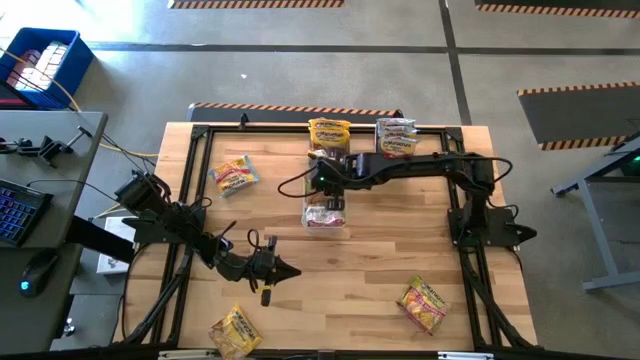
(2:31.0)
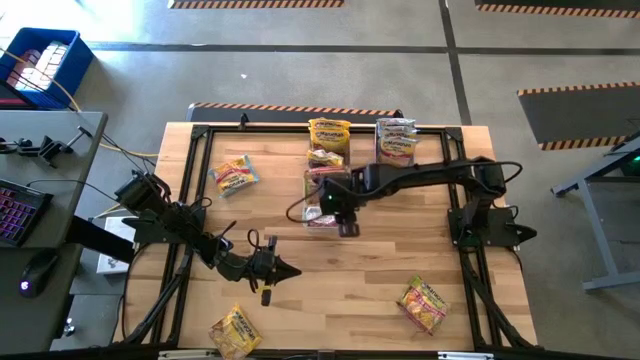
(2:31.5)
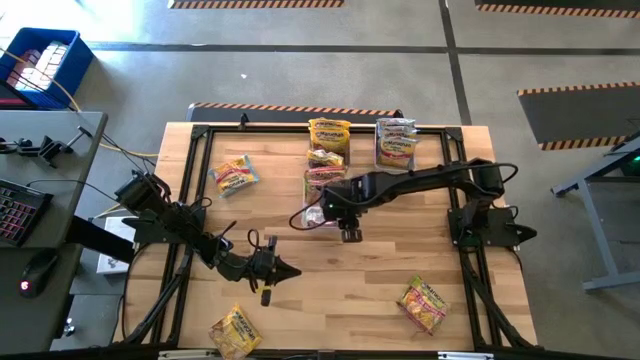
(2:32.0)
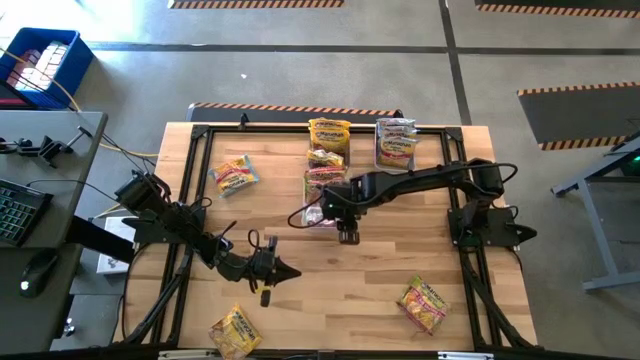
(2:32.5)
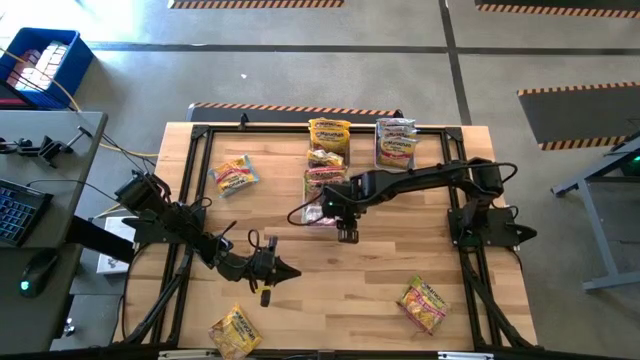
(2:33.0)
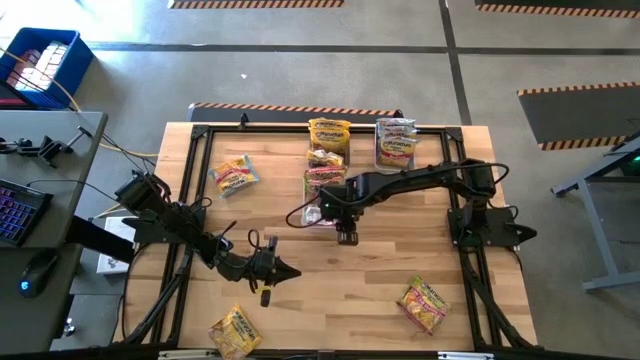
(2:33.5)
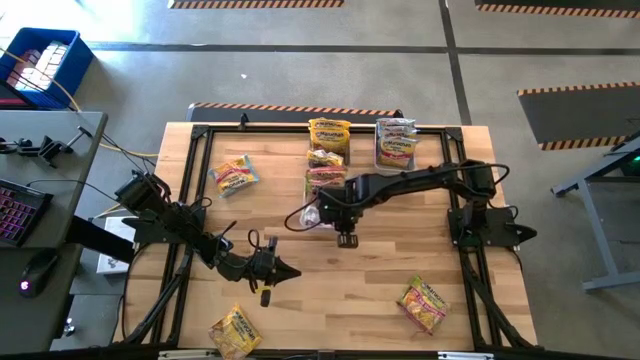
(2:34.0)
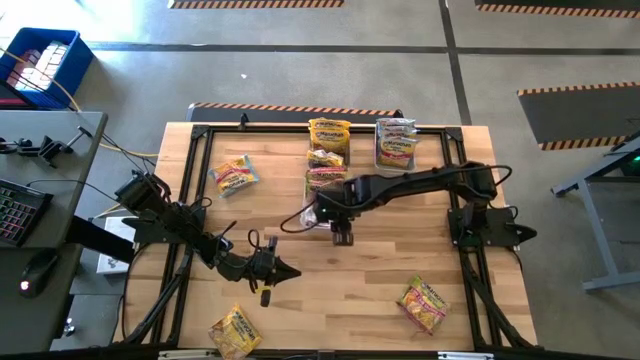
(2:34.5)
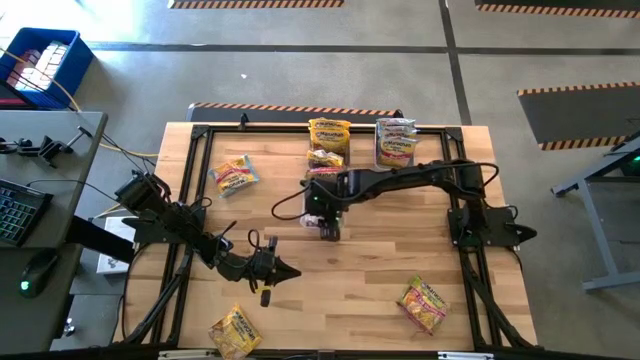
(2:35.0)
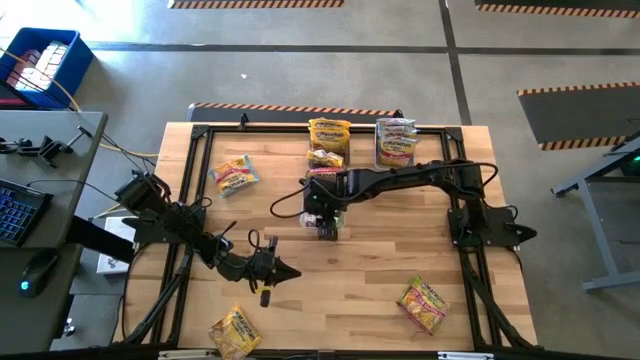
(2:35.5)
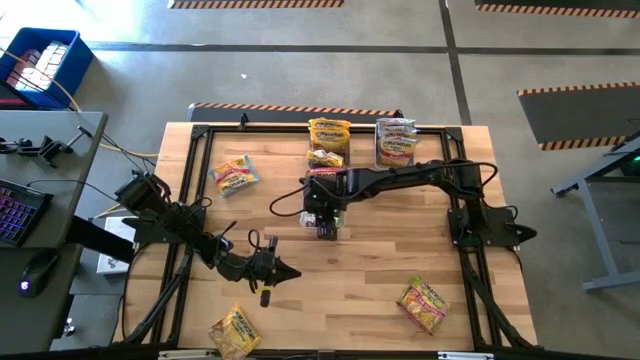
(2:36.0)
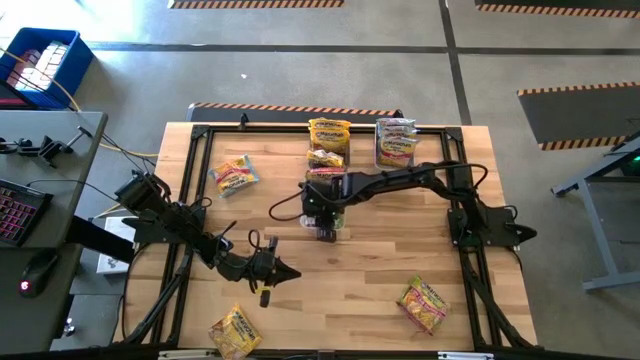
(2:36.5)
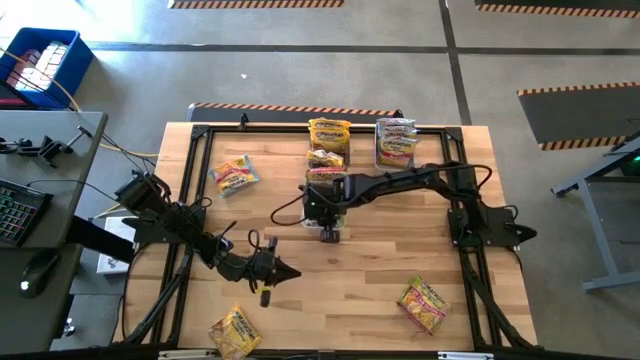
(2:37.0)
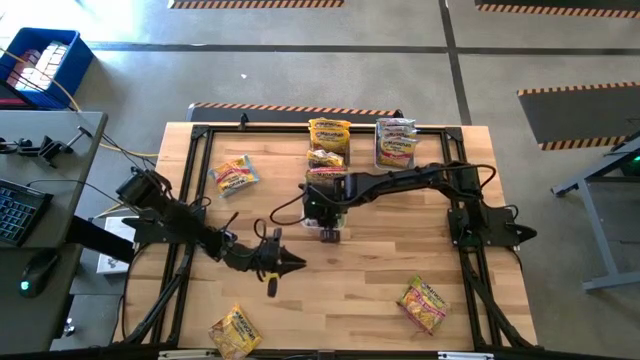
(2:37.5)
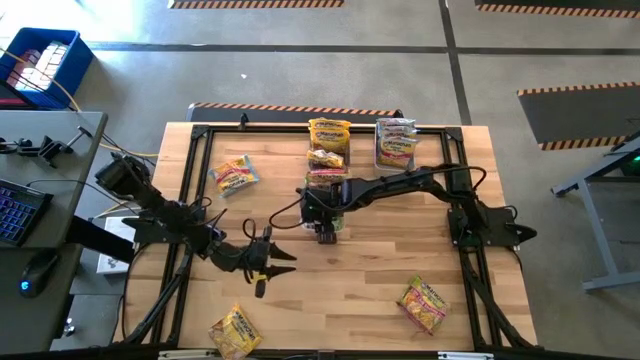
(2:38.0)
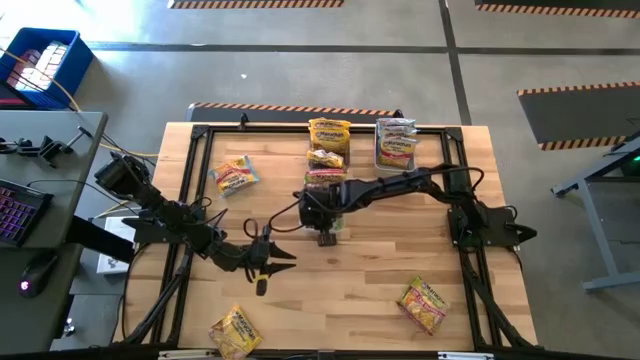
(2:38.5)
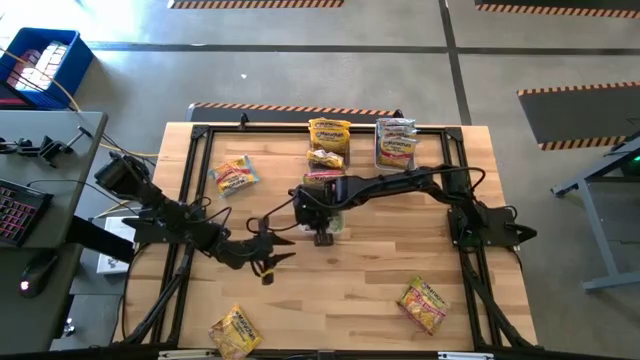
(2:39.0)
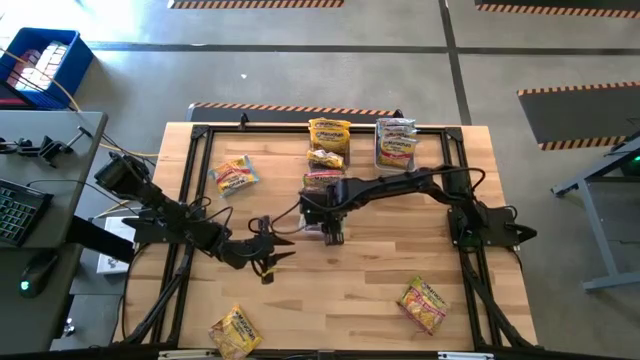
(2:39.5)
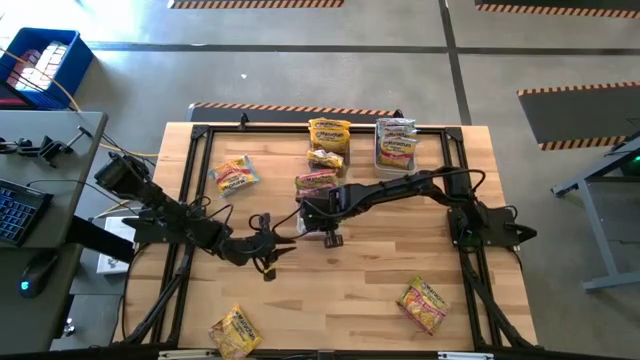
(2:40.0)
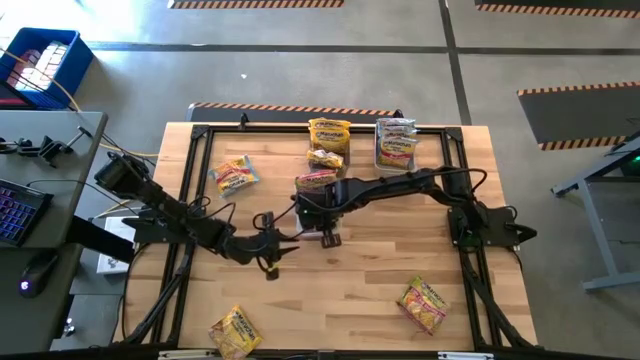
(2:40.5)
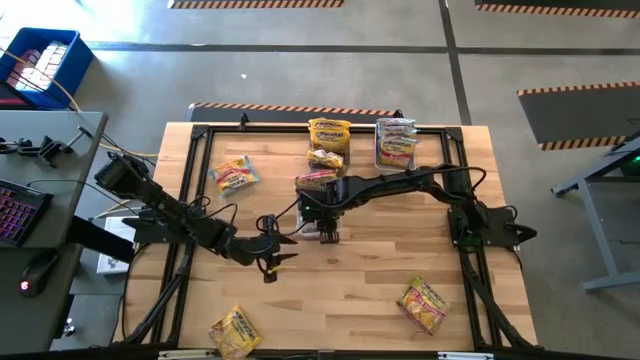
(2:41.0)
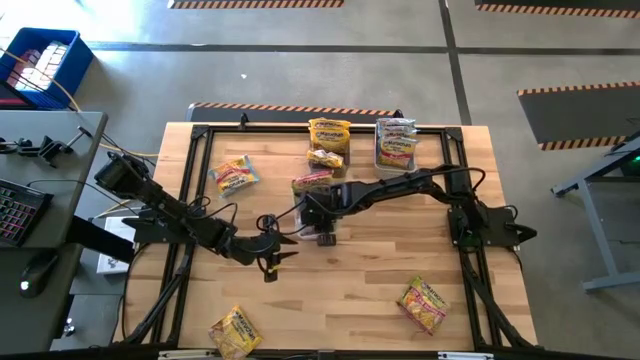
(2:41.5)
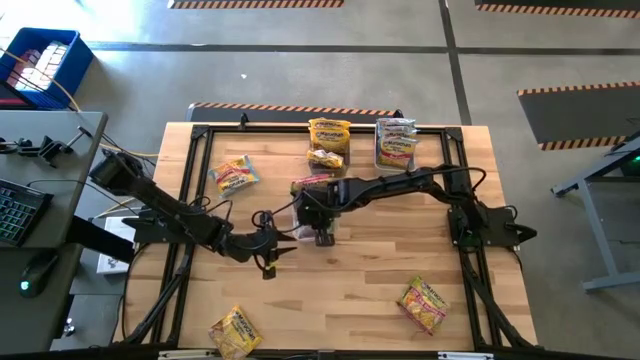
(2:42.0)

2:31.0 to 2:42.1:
Task: Sort Maruchan noodles
Adjust the green noodle pack in the transparent bin

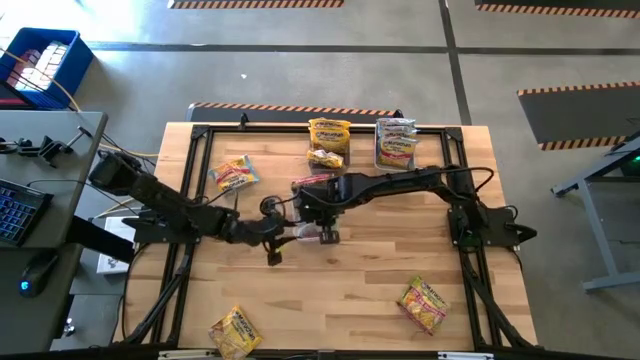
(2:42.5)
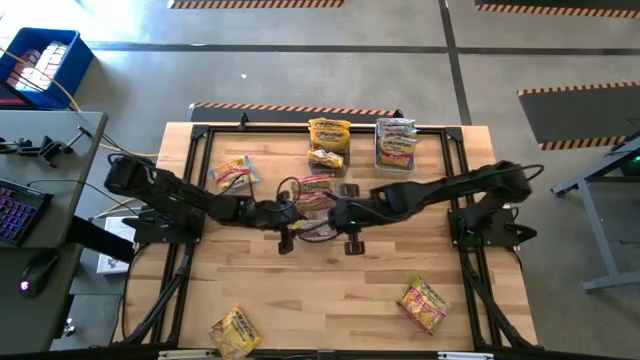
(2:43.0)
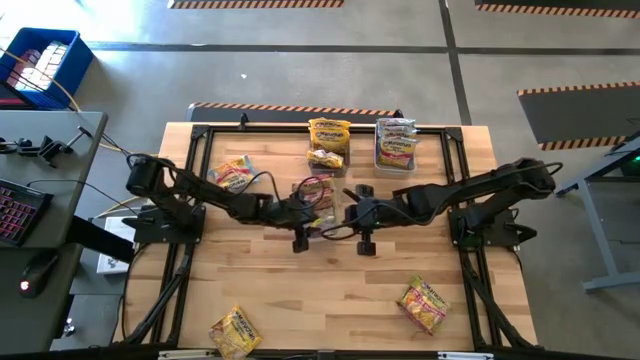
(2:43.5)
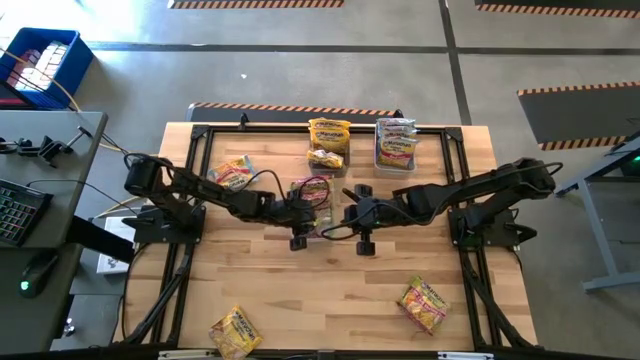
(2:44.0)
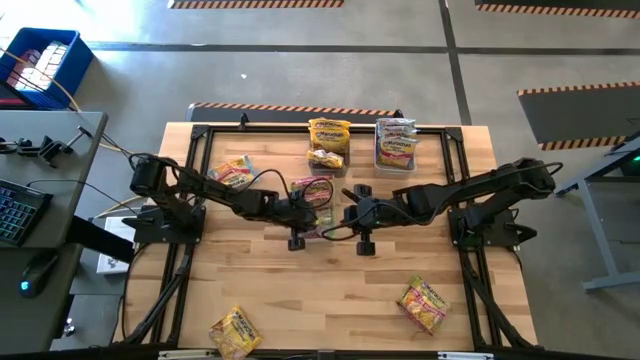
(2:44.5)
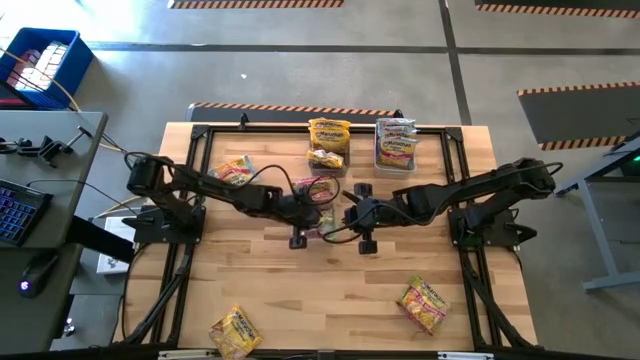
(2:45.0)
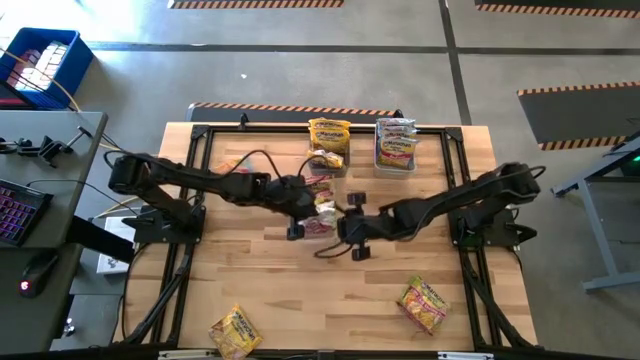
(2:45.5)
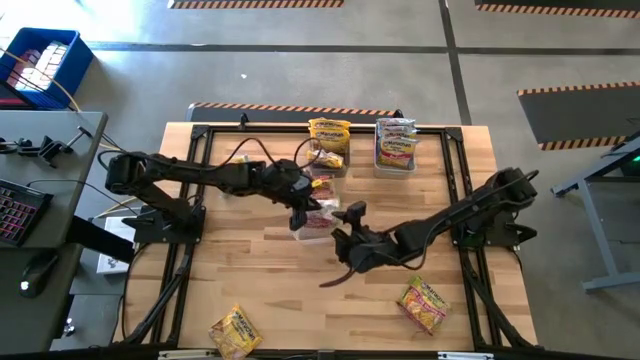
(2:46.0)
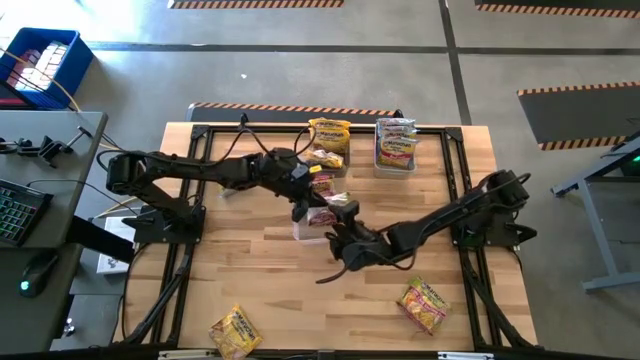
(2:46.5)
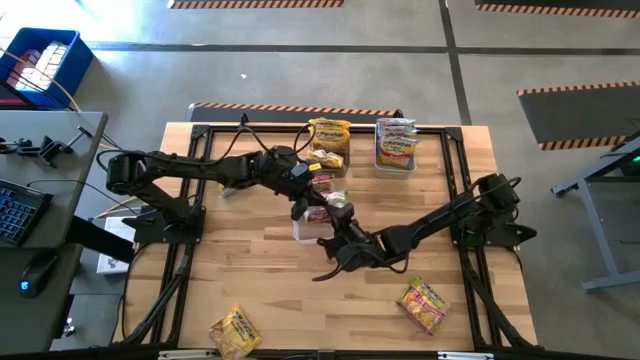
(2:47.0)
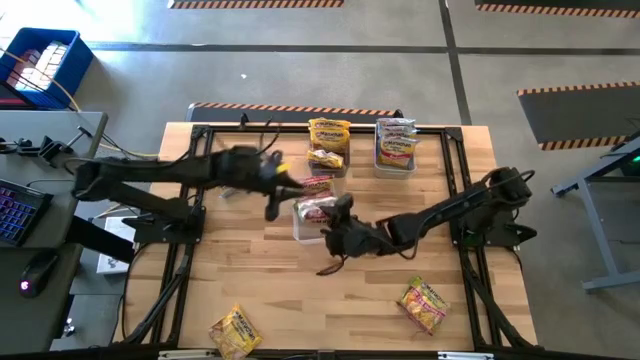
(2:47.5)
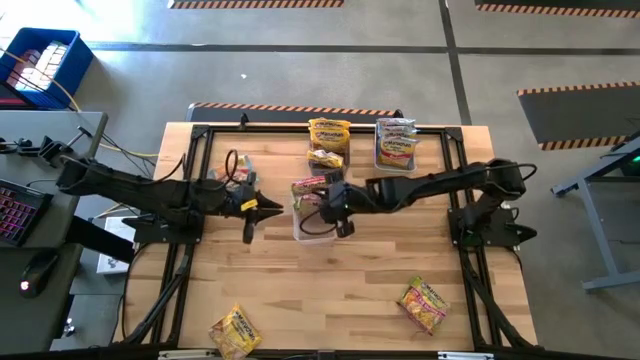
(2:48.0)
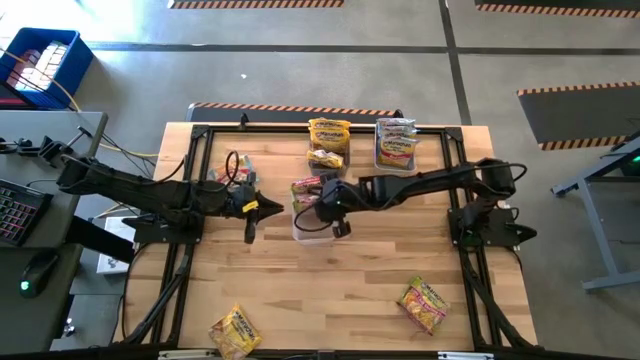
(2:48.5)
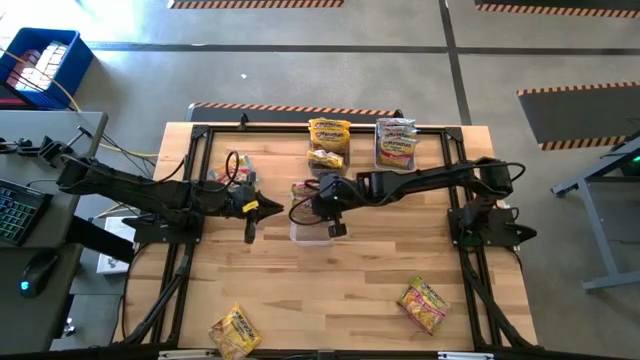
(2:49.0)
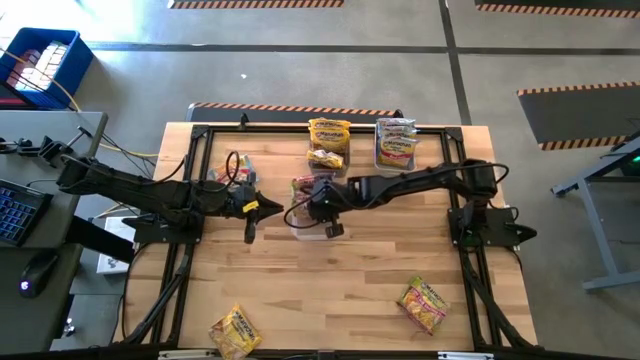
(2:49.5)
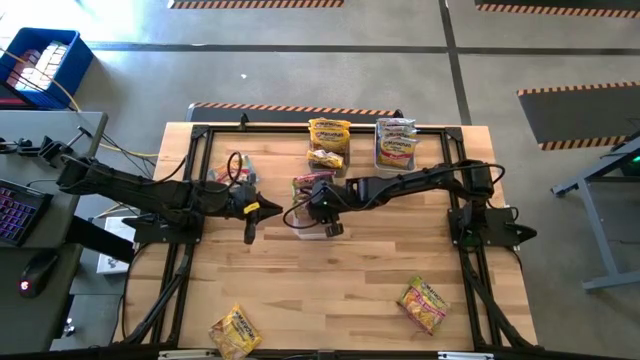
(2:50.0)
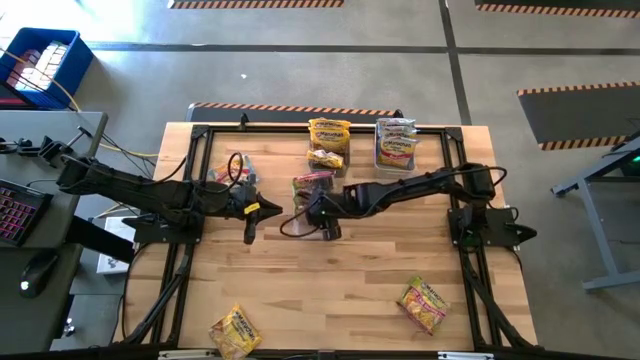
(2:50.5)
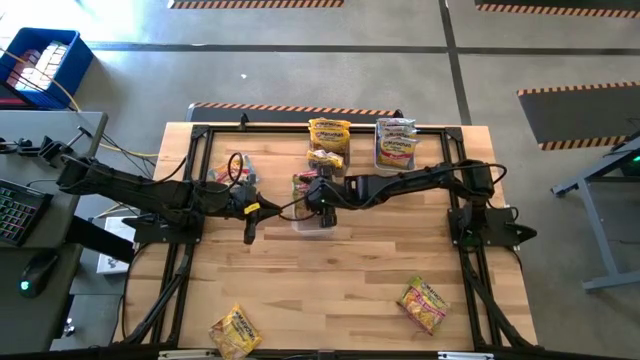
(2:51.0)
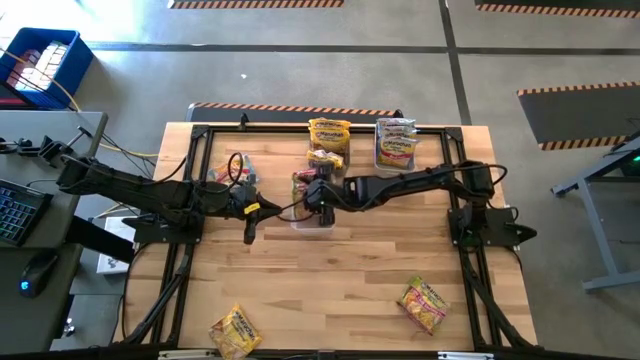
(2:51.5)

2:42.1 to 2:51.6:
Adjust the green noodle pack in the transparent bin

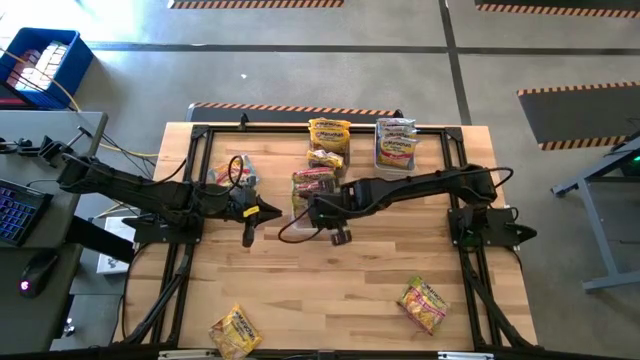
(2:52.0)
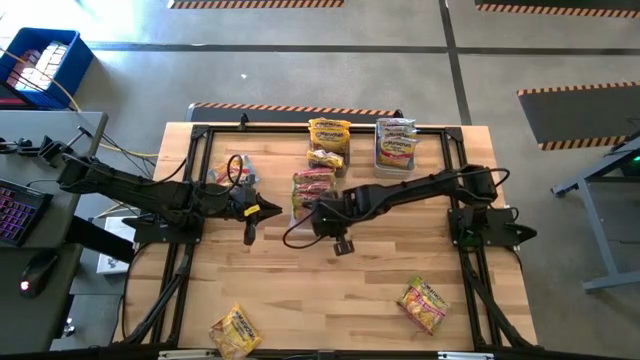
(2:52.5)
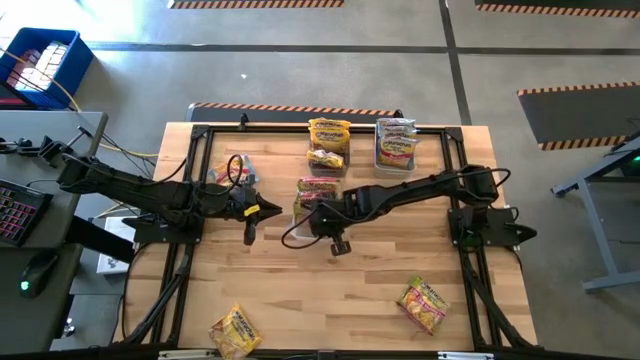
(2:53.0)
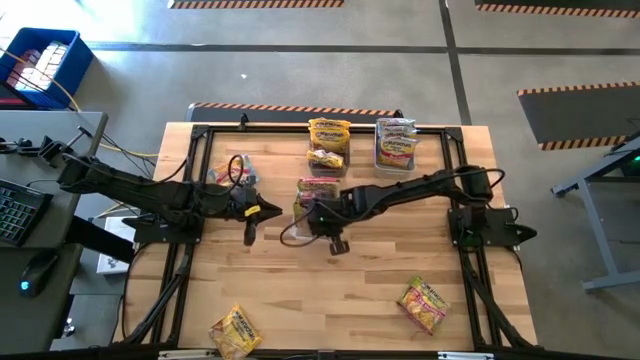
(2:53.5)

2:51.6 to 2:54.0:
Adjust the transparent bin
